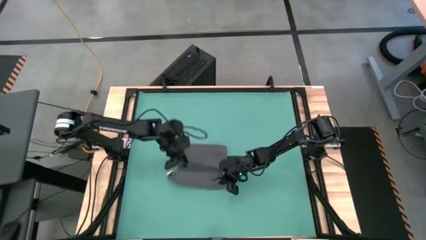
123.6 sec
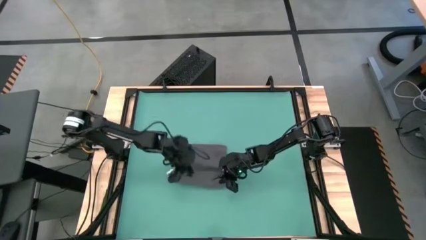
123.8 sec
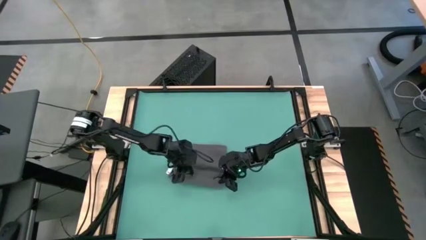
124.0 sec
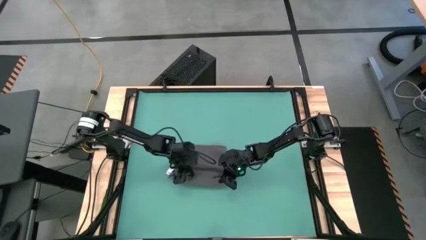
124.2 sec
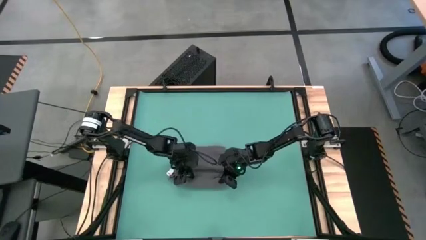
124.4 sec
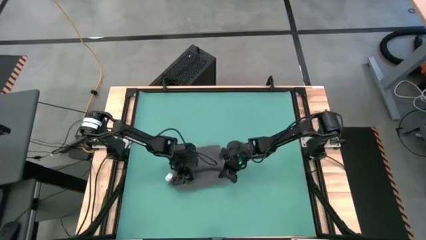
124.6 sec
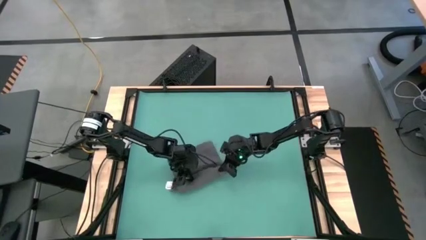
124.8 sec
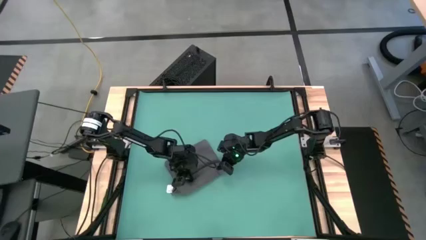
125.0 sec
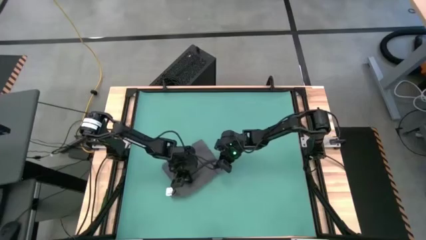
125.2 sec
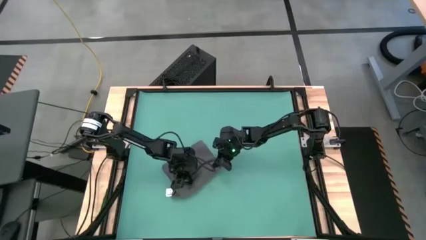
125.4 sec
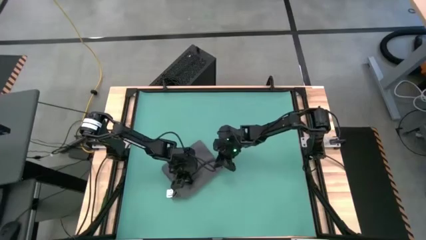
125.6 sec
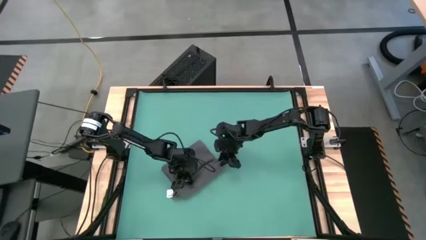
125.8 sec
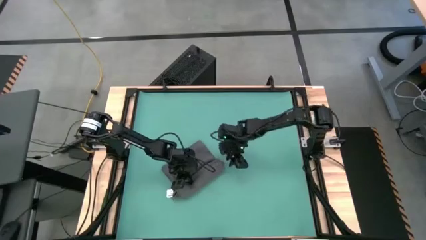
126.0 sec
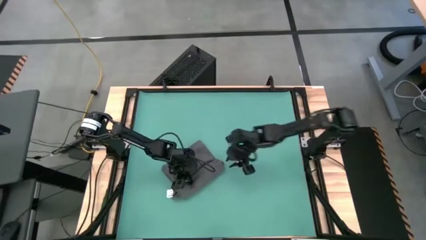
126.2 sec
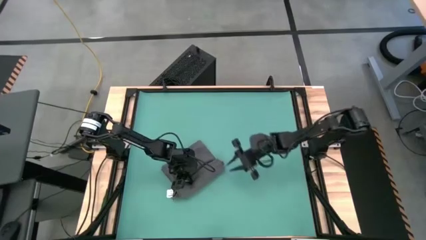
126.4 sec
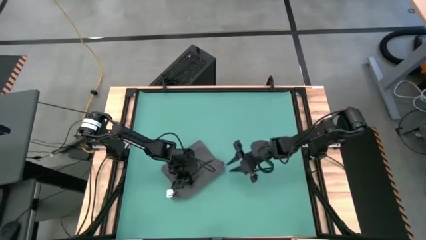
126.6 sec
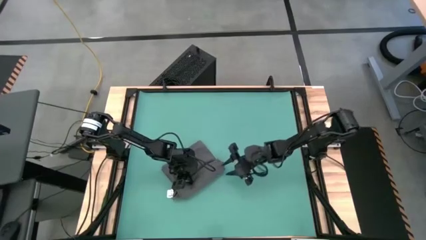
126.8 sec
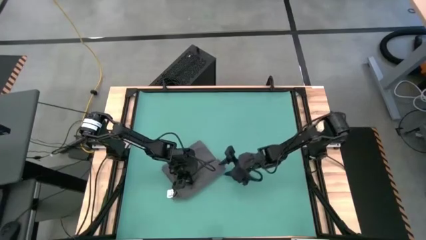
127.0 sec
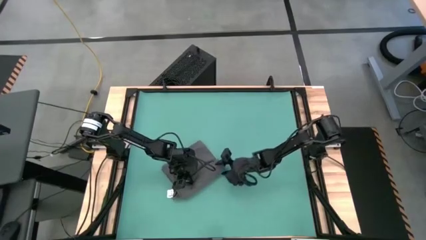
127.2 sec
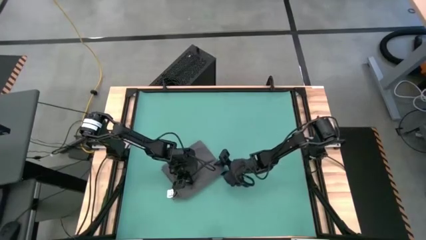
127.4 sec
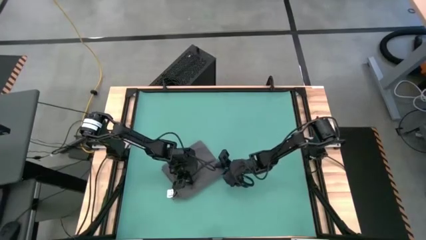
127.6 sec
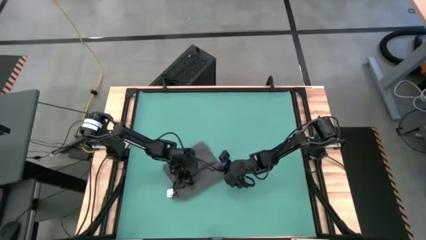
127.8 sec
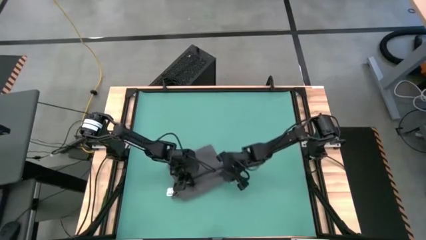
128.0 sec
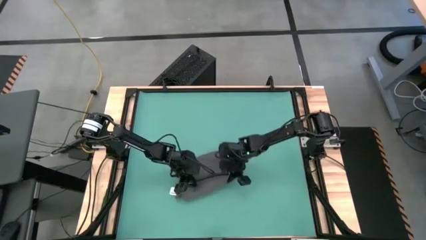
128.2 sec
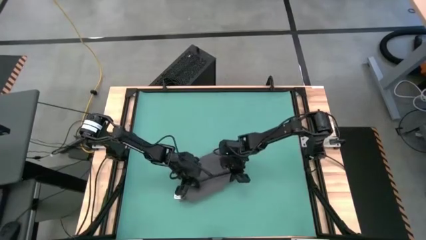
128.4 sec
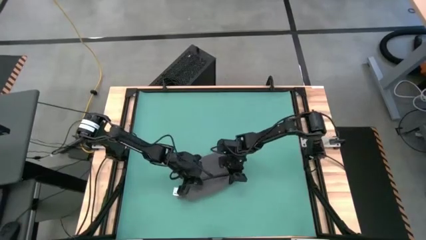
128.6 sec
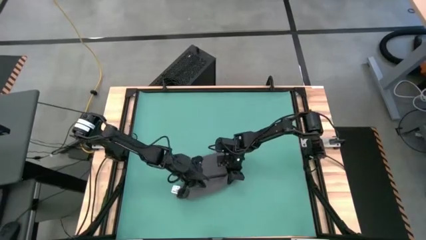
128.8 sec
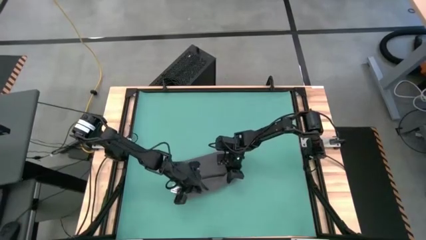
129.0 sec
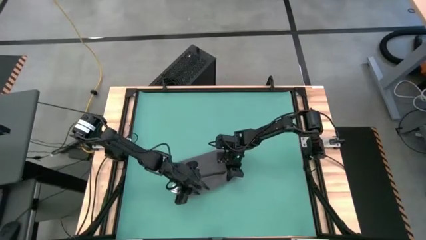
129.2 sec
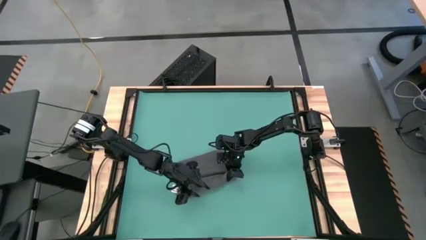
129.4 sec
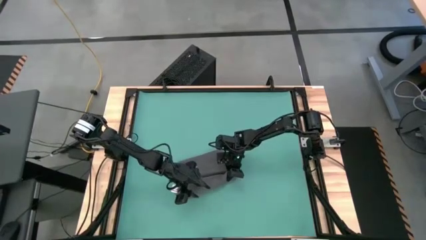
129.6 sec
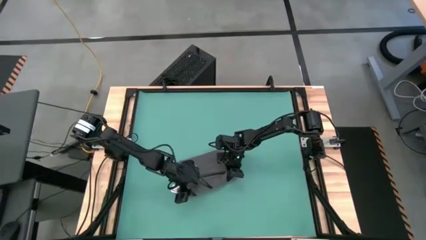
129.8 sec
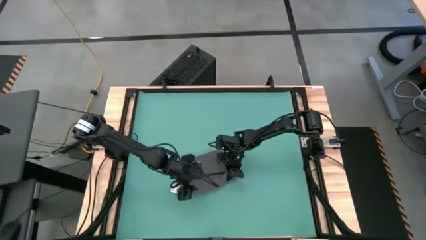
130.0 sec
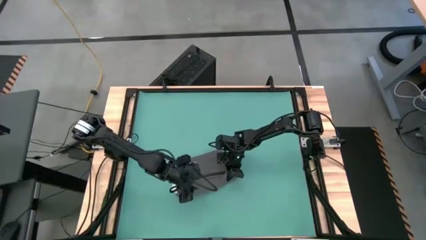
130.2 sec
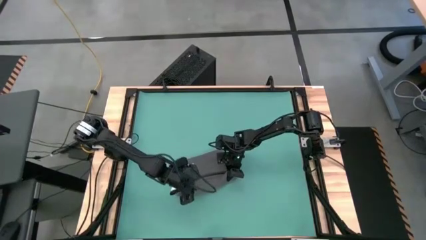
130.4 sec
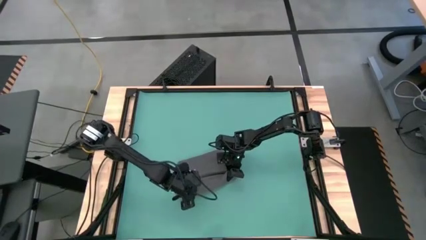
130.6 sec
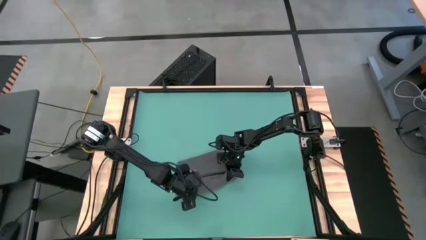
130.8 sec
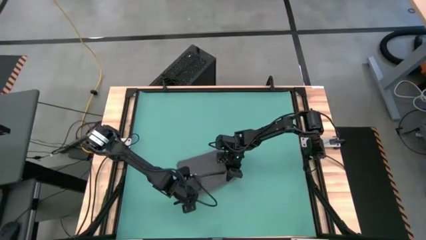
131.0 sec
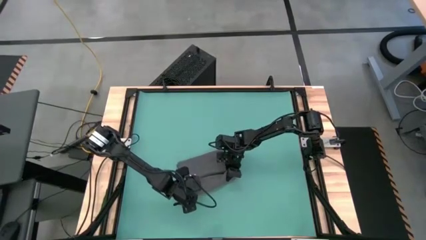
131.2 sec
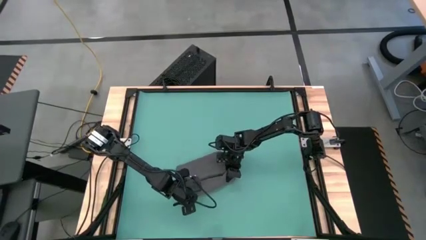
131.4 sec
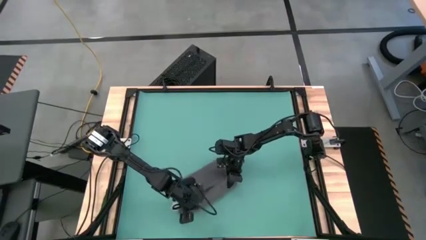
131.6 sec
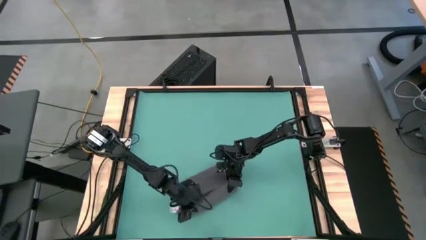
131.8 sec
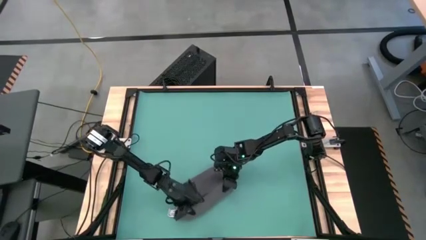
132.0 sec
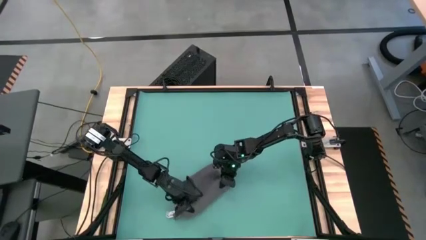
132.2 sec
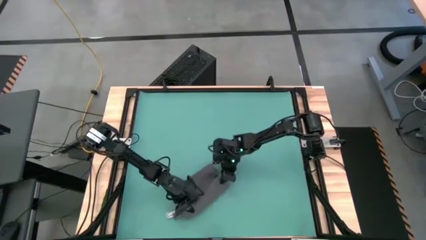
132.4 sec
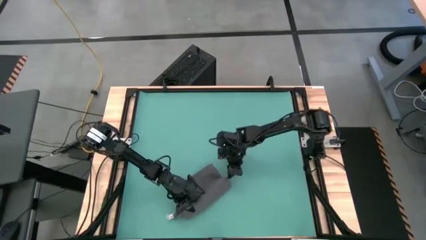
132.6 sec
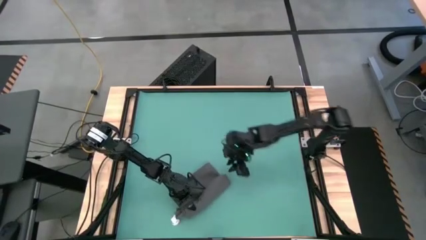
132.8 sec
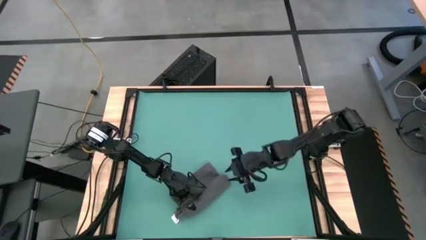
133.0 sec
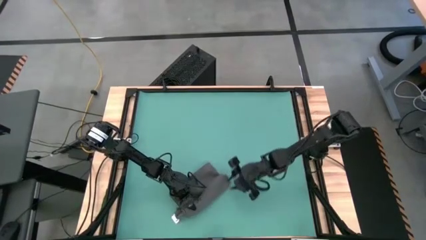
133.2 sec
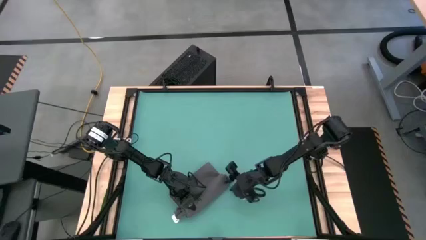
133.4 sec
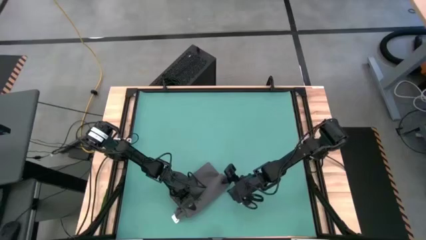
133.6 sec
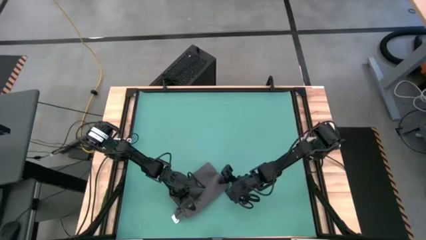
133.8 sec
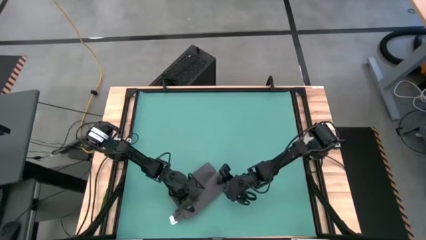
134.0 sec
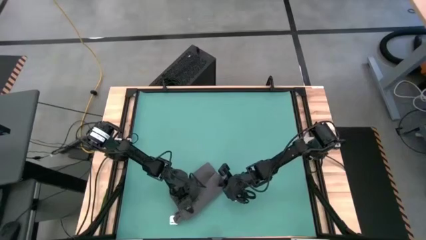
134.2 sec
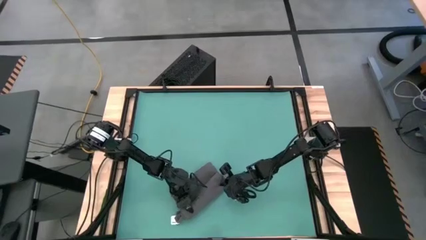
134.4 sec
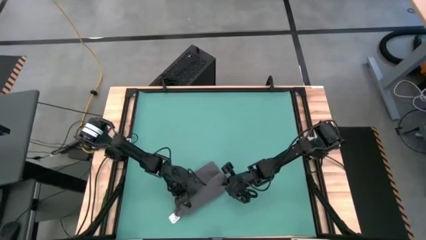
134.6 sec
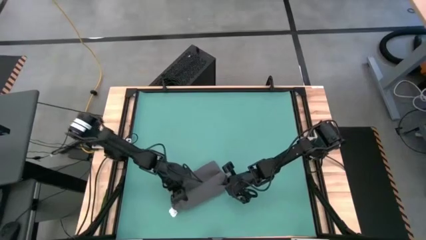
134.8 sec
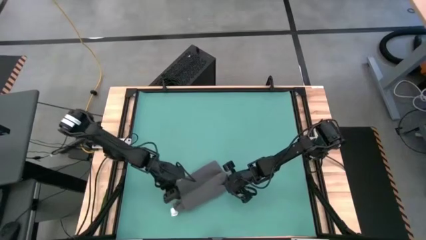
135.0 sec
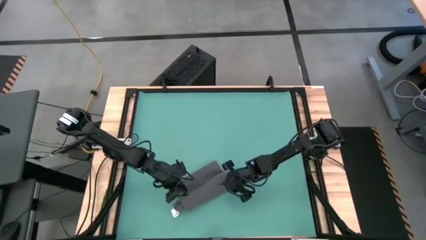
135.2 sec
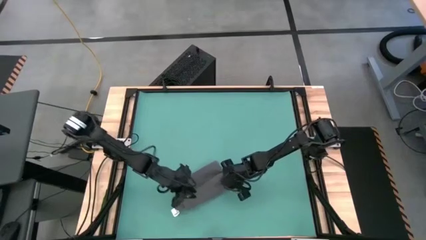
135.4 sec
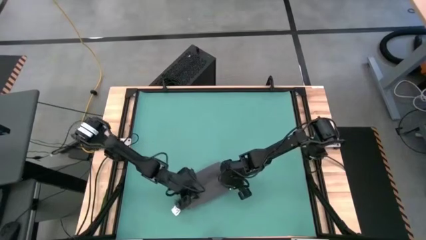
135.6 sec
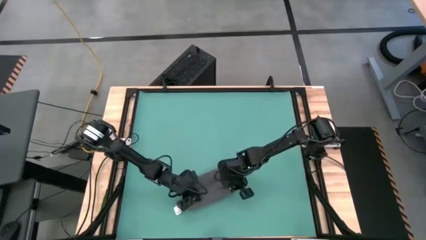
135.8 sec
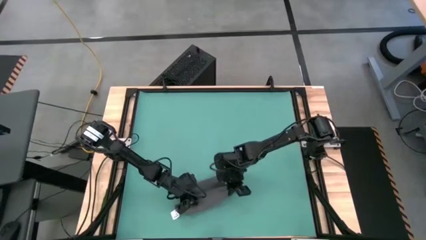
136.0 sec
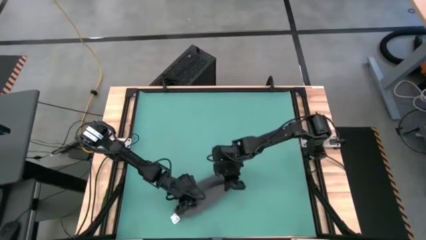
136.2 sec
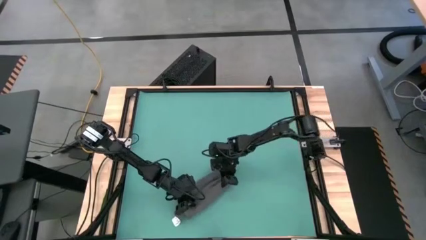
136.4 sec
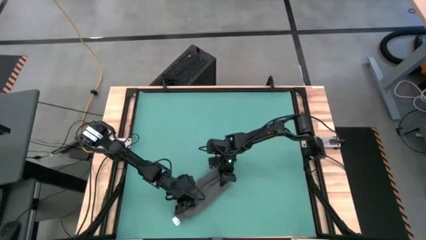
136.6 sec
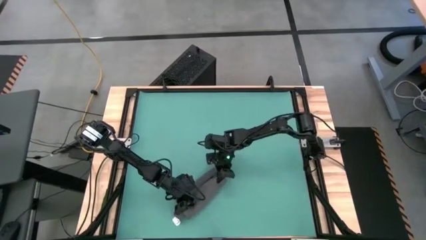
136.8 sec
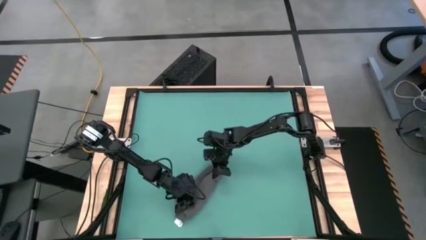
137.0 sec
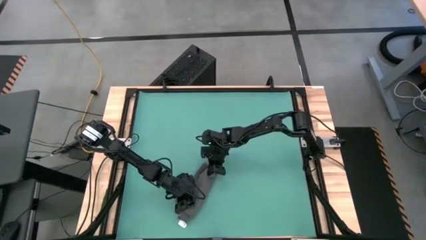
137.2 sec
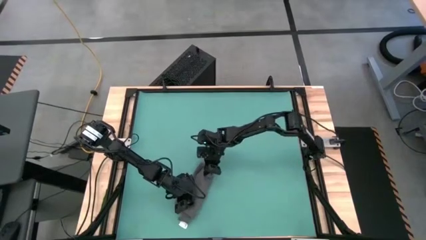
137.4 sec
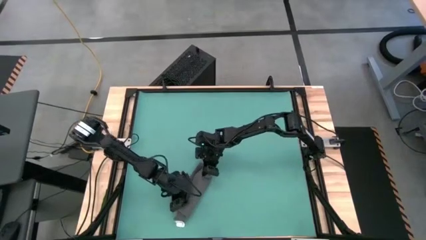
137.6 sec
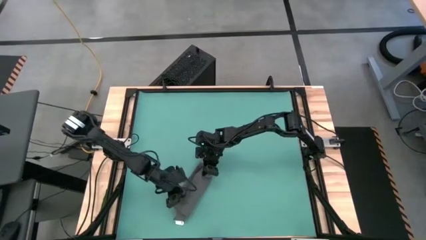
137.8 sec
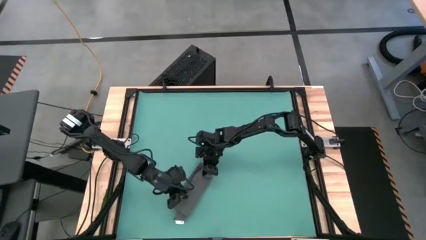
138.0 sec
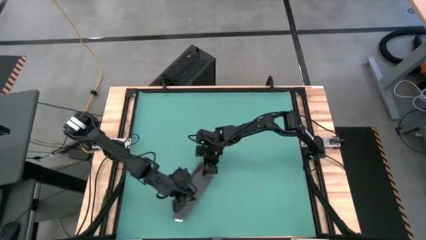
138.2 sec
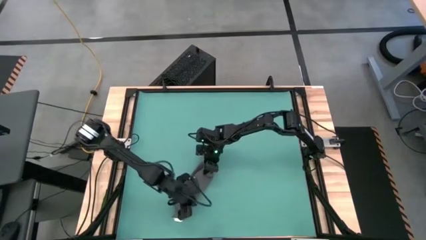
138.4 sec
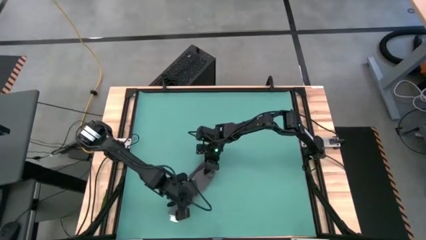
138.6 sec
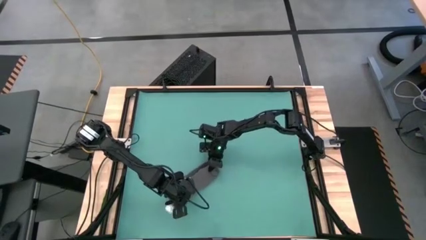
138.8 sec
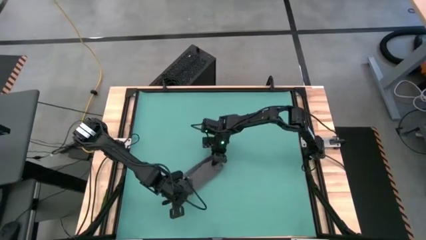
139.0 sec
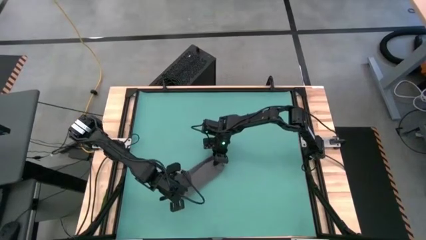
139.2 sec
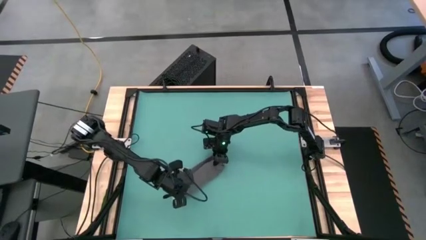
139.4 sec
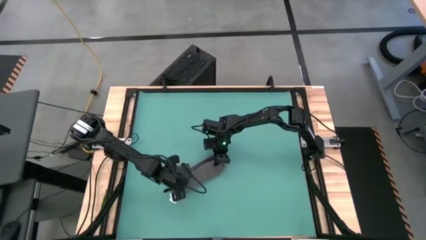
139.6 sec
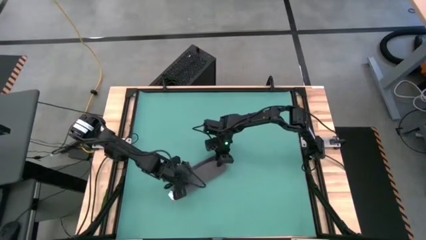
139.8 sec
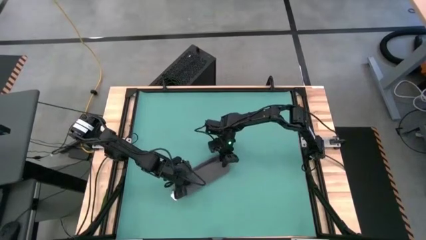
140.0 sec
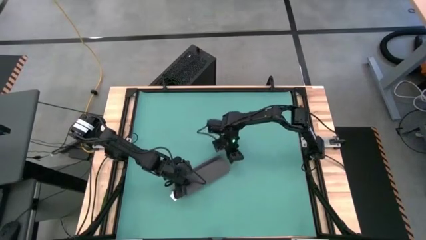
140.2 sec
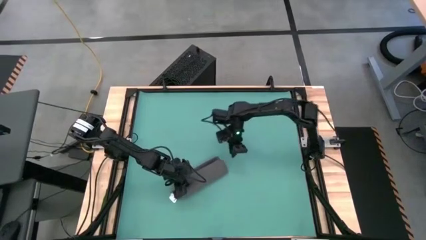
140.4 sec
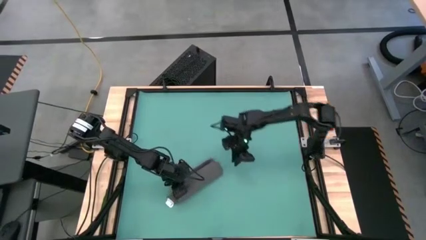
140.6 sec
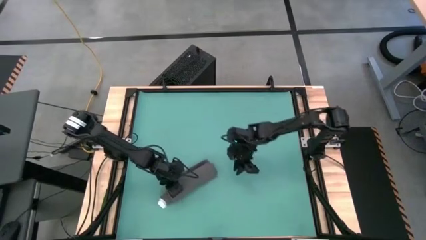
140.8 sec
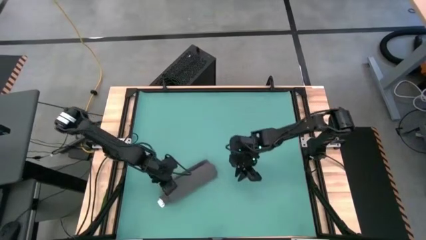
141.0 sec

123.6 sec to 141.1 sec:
Task: Roll towel into tight, uniform cylinder
Roll the gray towel

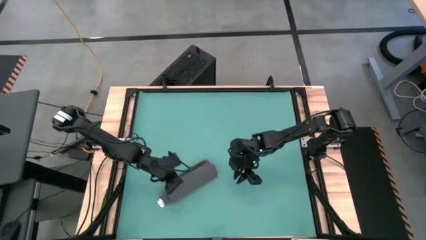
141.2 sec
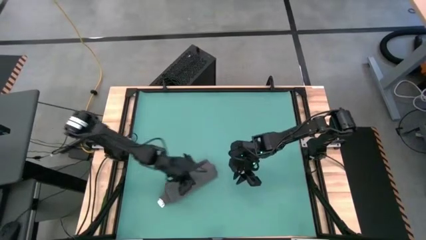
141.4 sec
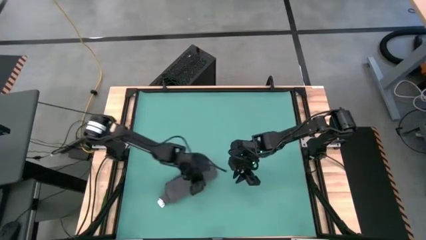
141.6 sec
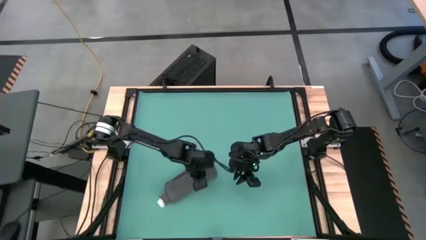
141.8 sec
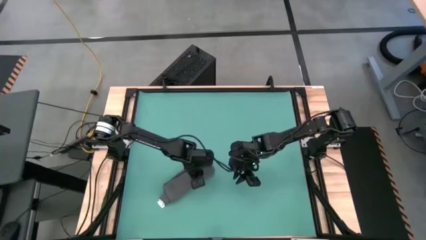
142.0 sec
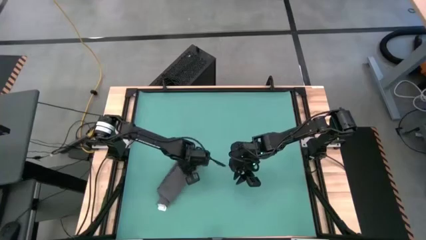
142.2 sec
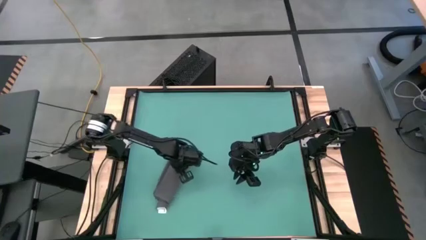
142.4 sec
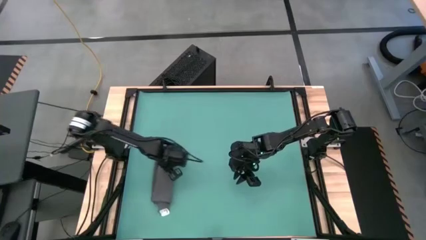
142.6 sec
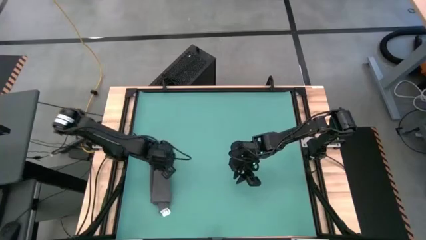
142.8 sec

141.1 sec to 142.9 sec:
Move the gray towel to the left on the table
